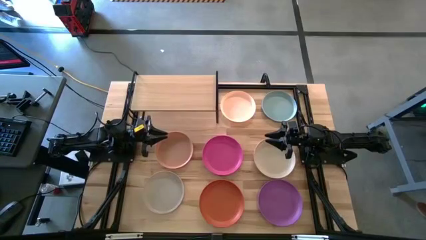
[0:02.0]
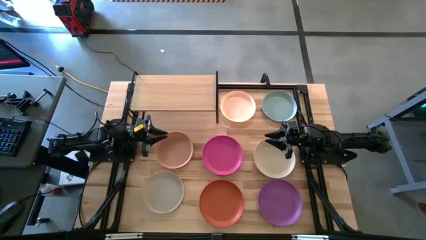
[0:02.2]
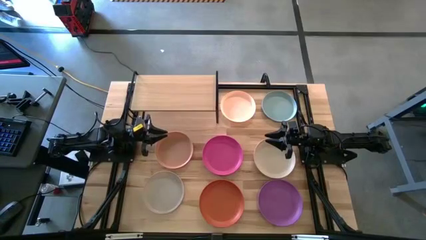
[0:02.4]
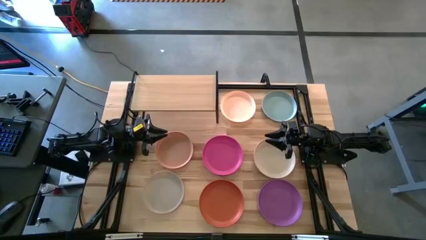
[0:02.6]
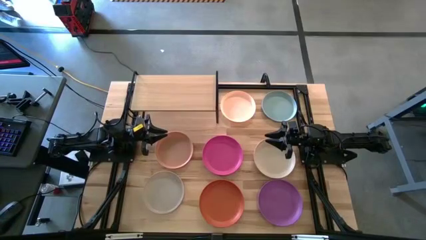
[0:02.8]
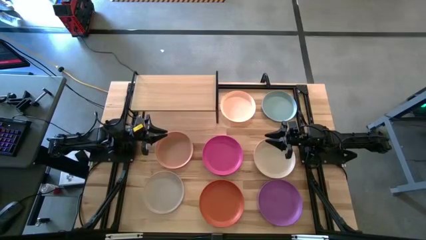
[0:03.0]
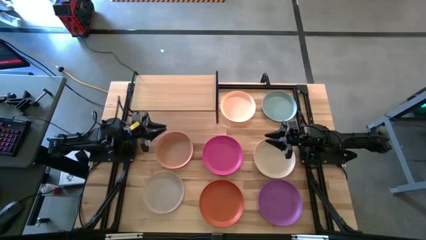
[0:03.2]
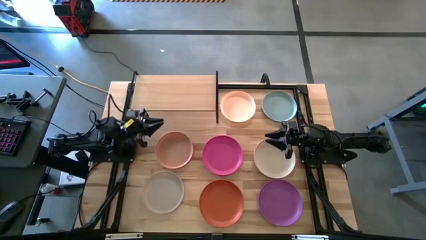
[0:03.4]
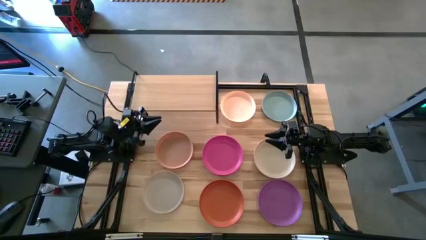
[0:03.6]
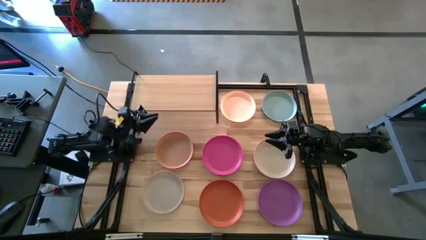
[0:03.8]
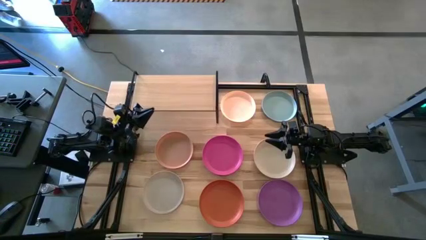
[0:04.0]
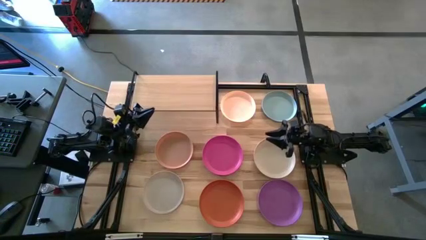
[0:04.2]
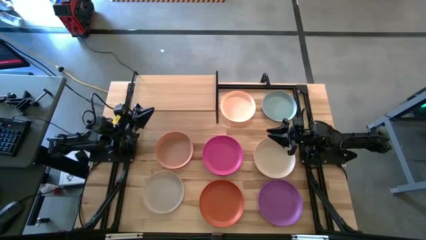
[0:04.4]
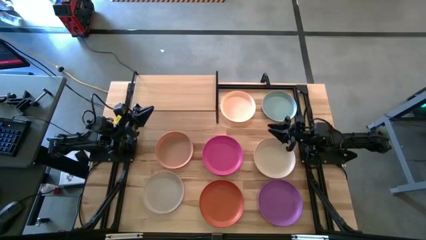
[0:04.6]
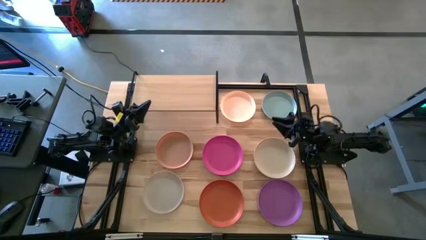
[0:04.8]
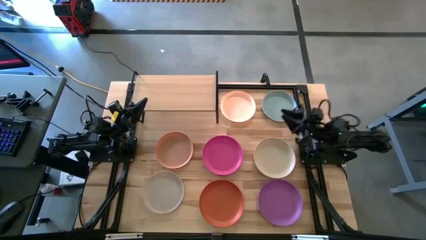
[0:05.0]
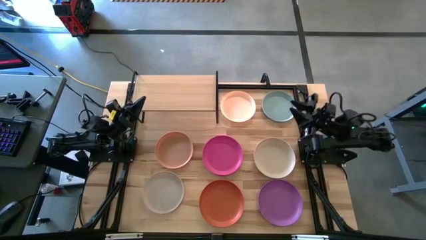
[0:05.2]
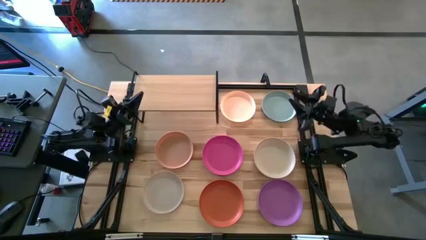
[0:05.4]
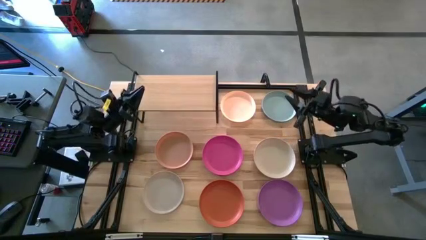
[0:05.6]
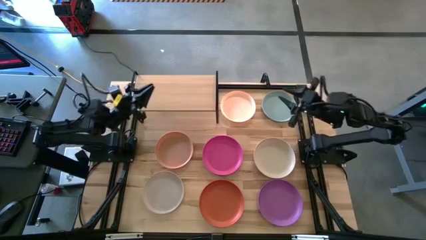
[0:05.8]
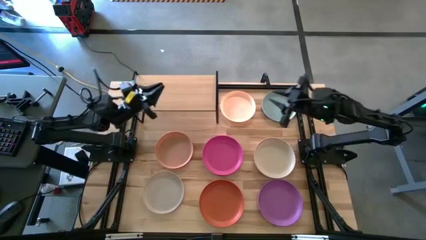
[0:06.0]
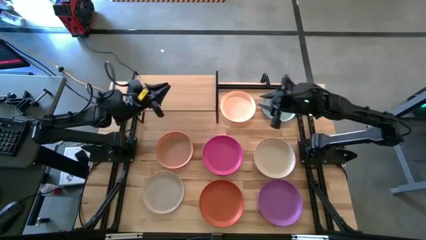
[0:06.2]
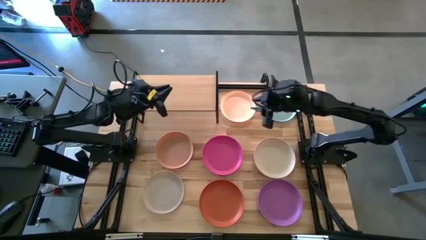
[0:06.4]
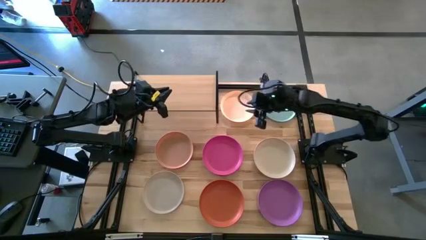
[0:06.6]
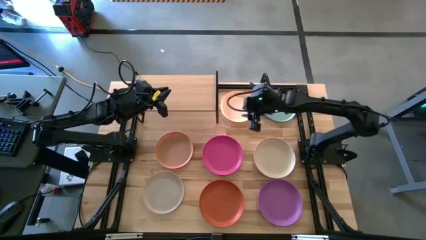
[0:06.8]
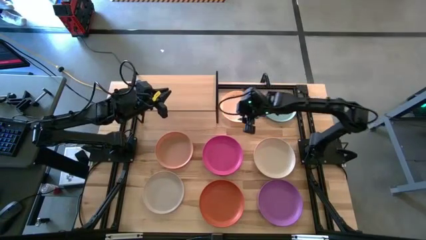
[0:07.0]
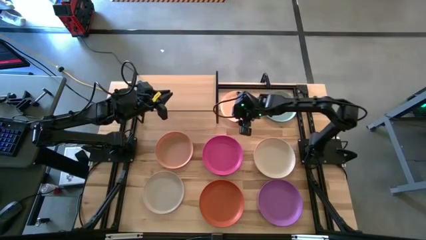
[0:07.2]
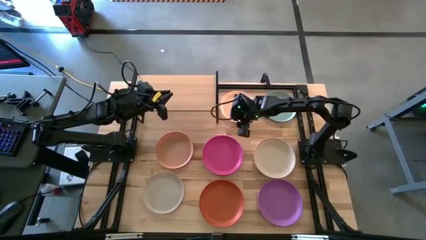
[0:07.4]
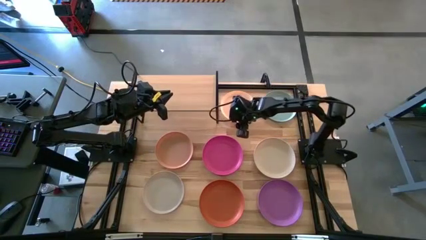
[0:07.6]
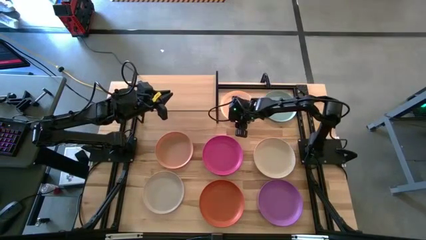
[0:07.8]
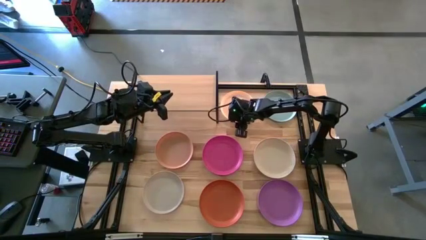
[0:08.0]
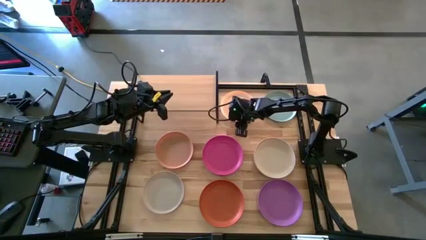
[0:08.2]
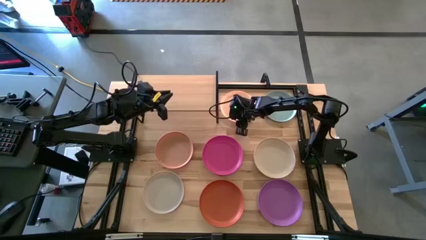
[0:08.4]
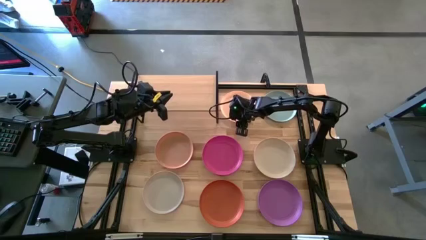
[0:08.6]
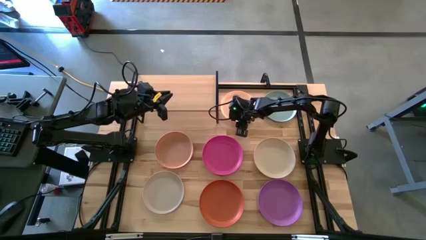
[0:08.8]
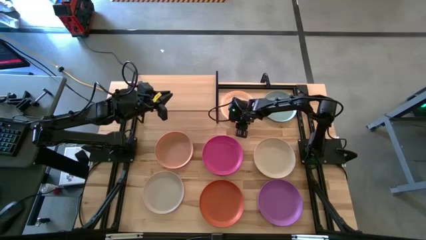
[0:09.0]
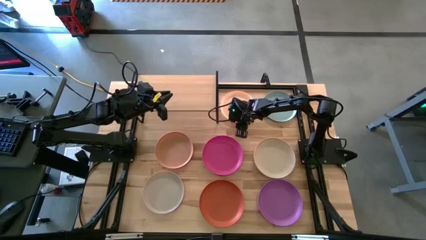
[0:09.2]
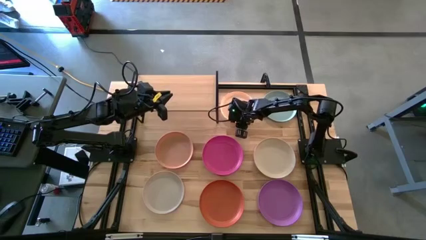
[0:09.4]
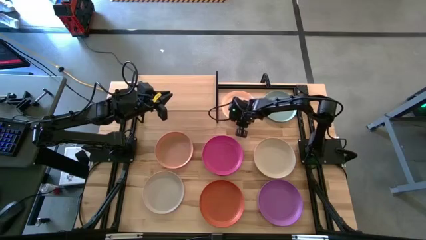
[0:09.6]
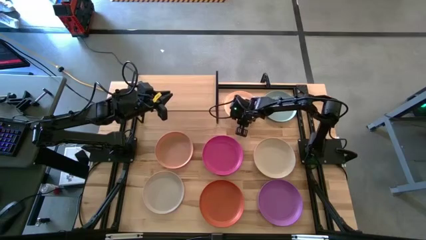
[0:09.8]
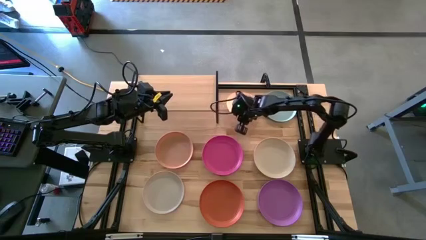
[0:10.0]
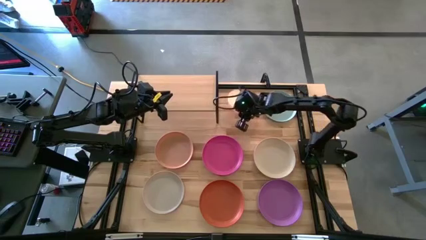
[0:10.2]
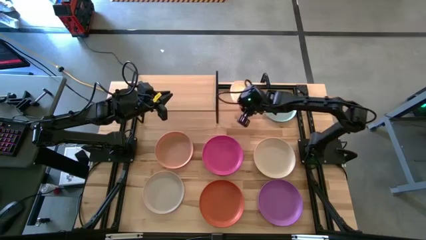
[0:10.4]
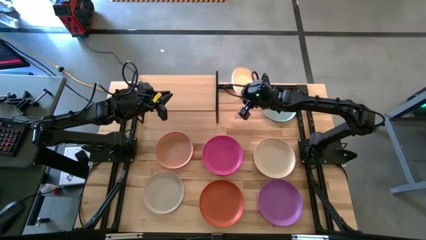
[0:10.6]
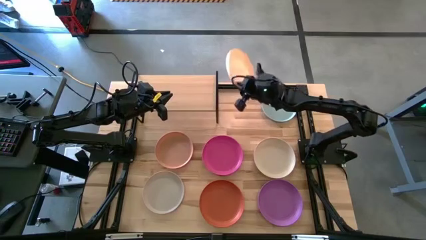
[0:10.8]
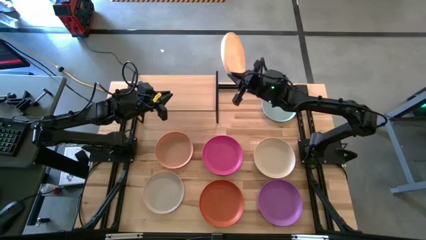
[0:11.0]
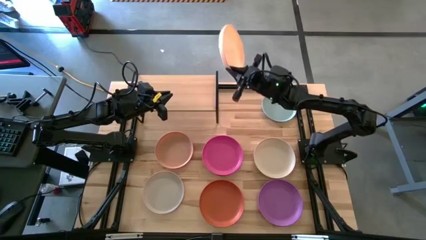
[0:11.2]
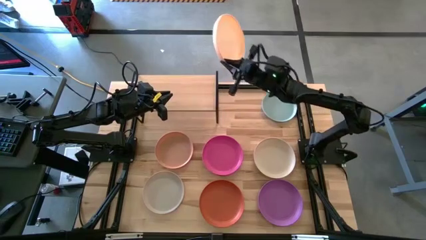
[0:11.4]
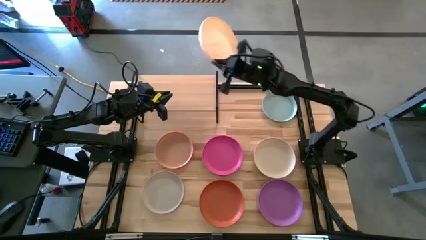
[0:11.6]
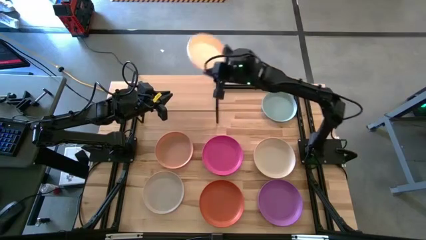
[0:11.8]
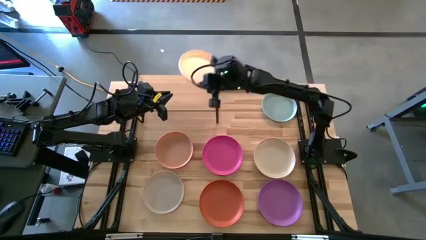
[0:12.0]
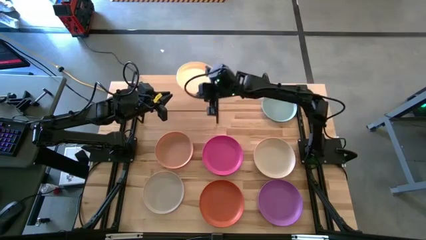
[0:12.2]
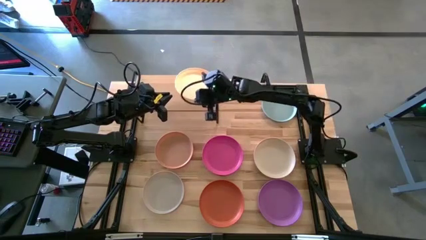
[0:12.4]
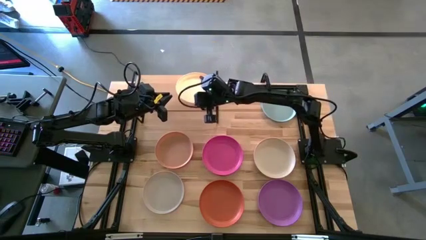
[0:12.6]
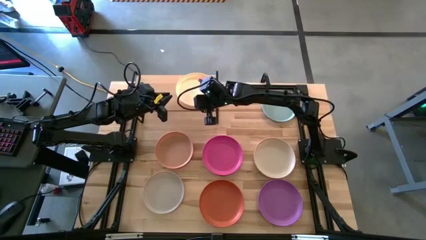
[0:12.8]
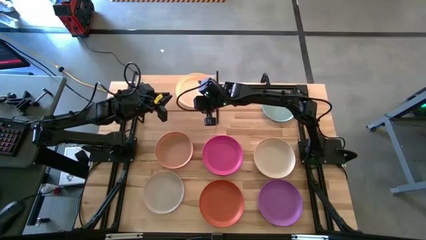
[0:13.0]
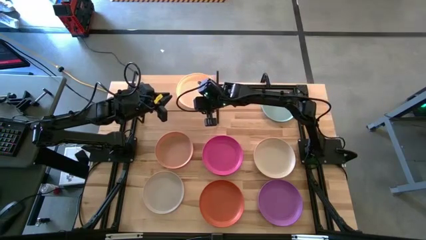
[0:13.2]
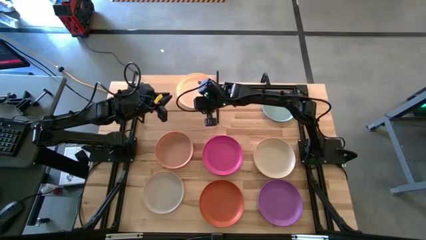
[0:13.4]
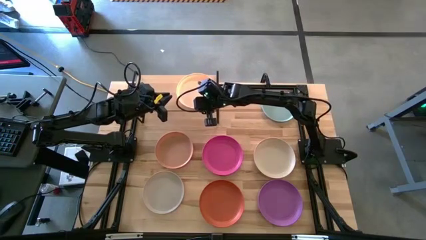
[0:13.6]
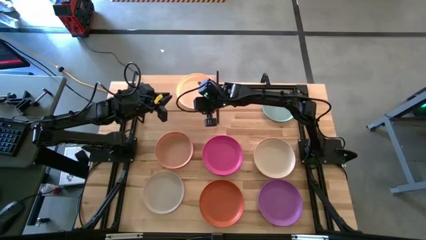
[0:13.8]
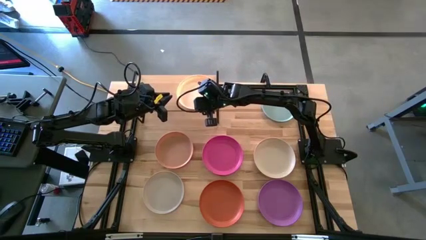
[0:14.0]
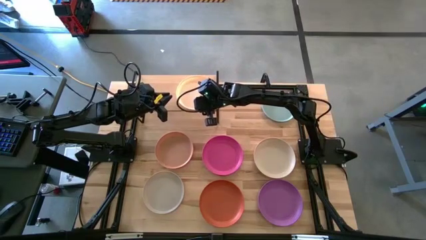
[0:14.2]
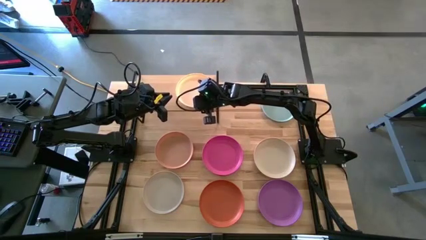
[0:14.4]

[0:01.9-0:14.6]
Task: Place and stack plates onto a shelf
Put the light orange plate on the shelf

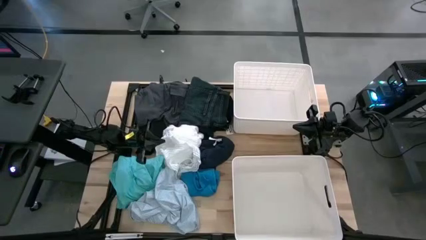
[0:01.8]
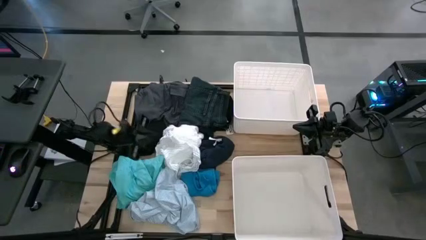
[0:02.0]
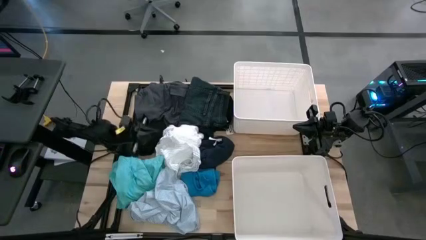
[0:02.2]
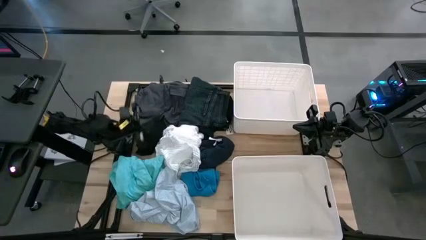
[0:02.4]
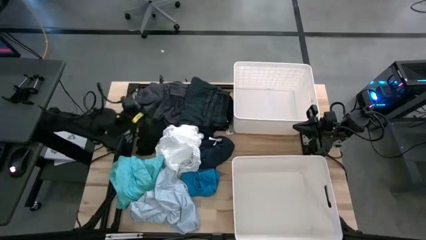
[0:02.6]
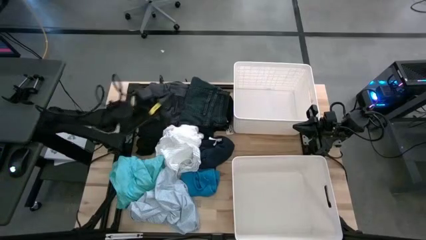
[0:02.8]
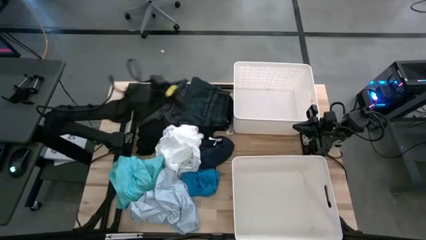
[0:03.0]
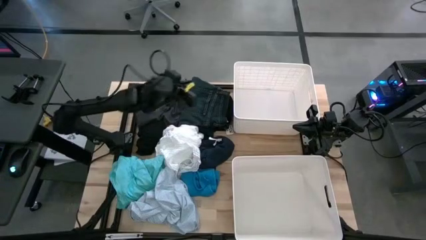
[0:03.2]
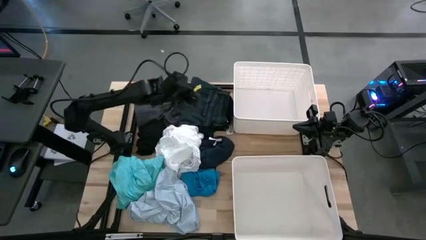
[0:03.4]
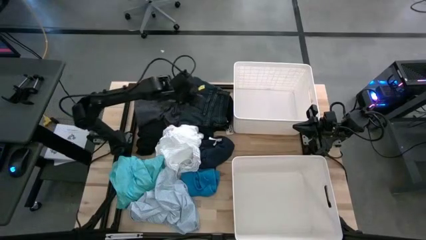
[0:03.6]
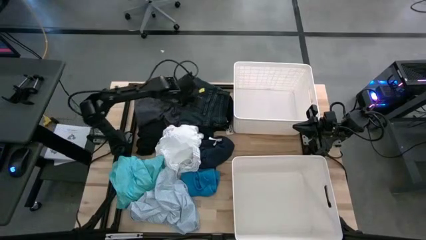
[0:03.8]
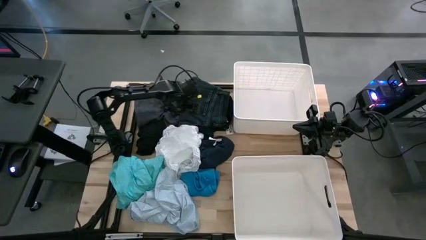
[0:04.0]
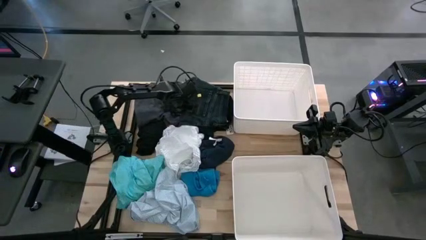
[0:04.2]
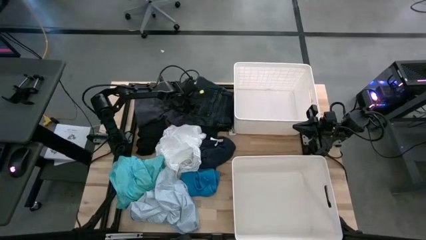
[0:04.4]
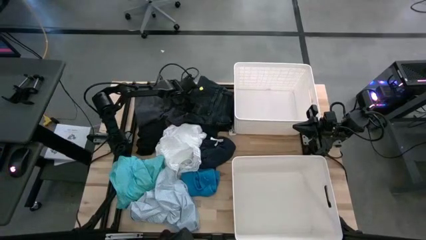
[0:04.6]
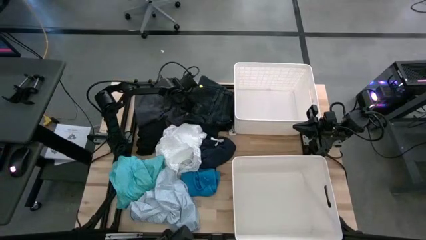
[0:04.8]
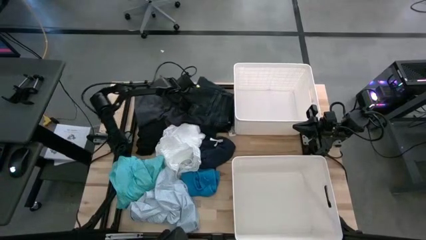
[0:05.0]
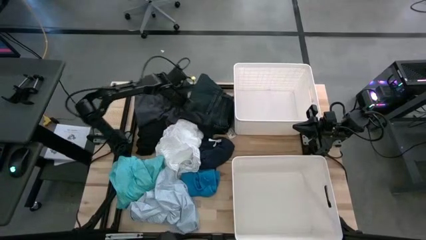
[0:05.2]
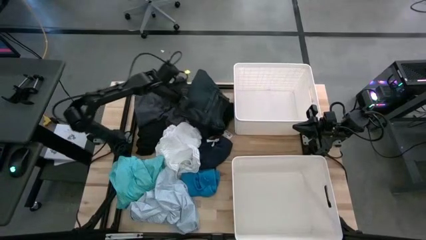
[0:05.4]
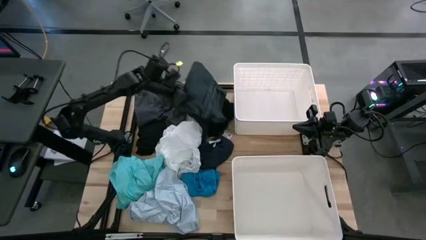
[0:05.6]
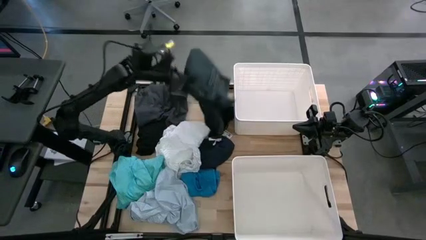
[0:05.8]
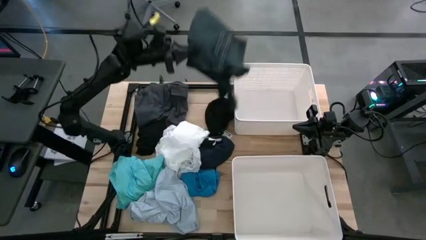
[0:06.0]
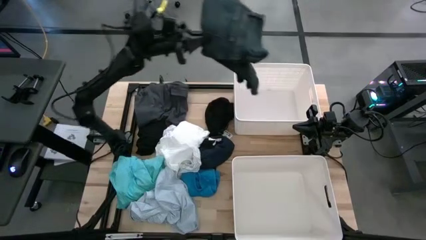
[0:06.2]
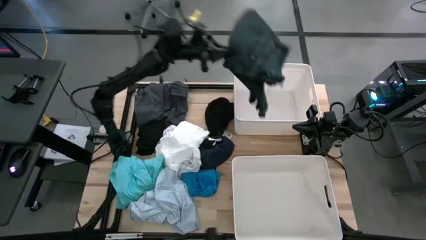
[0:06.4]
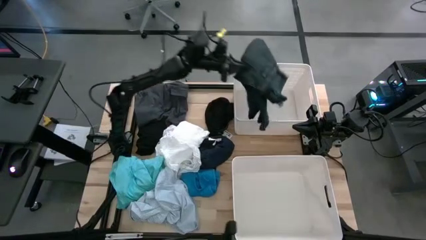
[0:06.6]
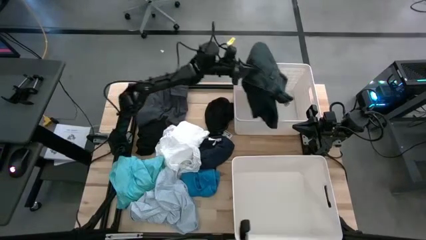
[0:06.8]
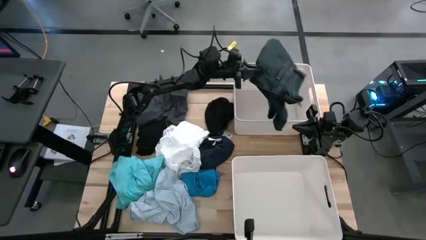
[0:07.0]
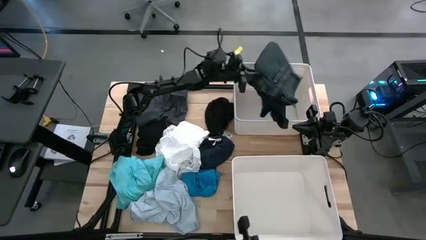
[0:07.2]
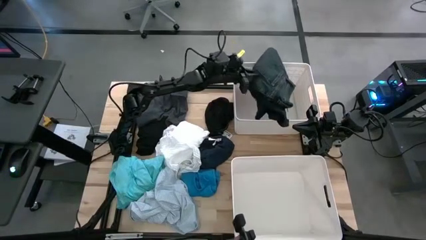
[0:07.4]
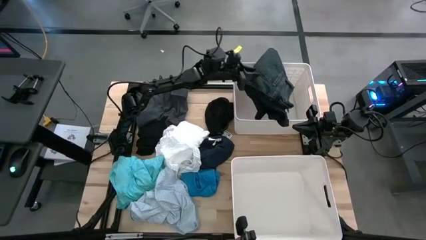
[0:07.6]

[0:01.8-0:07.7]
Task: Sort clothes
Put the dark blue jeans into the top white laundry bin
